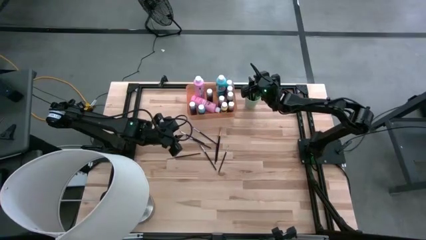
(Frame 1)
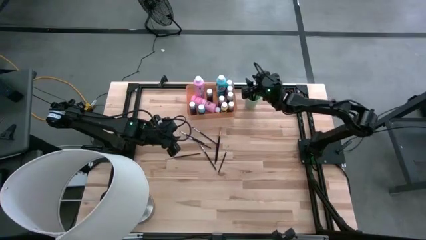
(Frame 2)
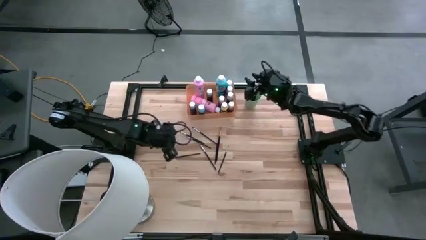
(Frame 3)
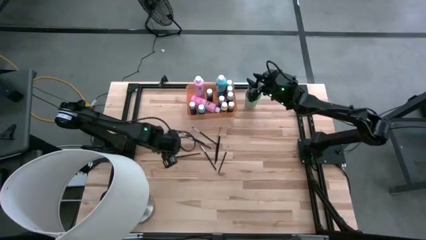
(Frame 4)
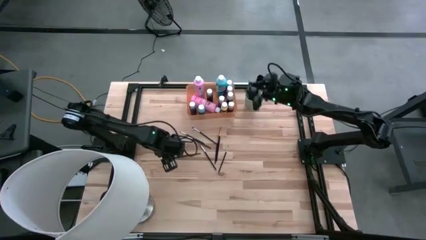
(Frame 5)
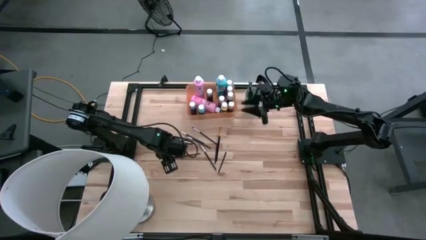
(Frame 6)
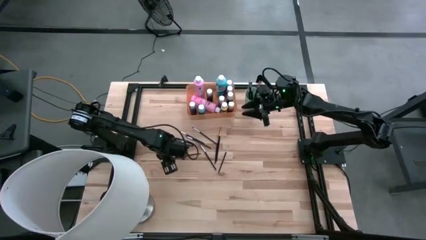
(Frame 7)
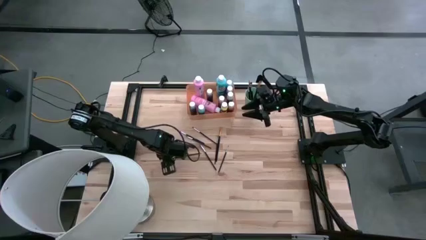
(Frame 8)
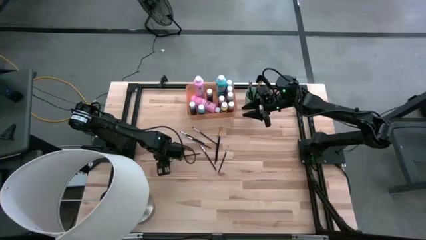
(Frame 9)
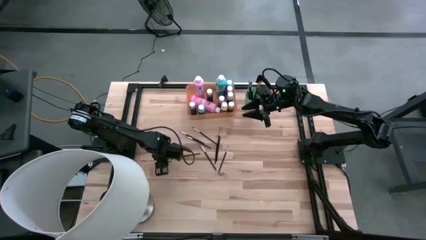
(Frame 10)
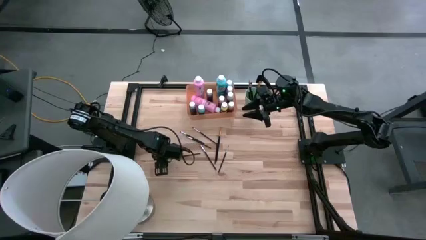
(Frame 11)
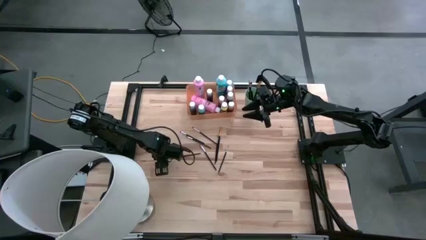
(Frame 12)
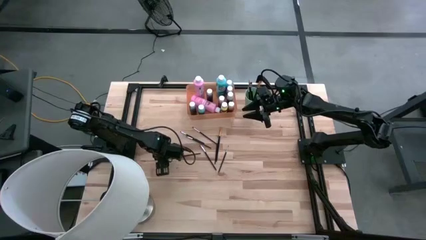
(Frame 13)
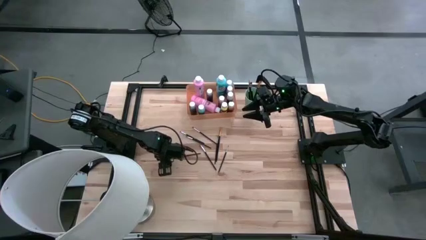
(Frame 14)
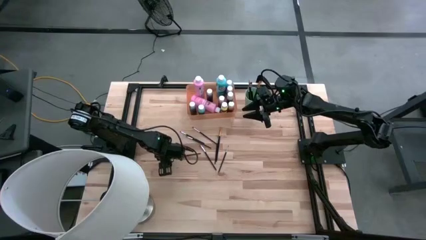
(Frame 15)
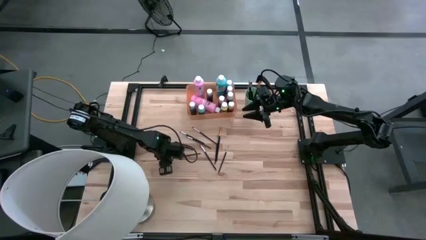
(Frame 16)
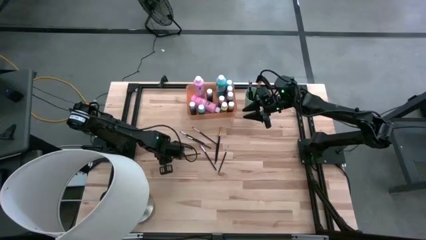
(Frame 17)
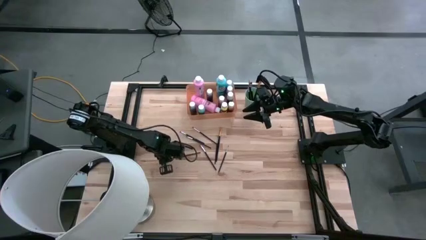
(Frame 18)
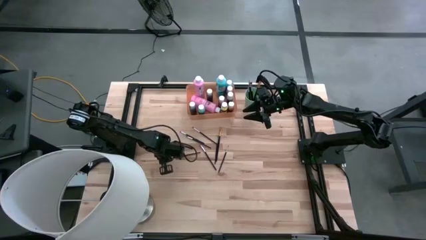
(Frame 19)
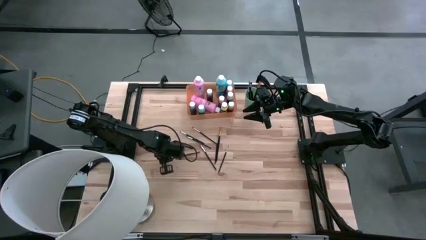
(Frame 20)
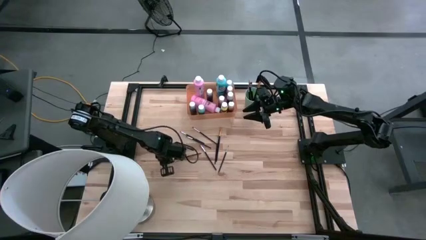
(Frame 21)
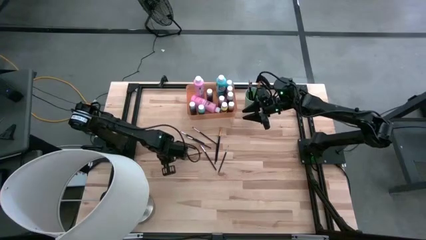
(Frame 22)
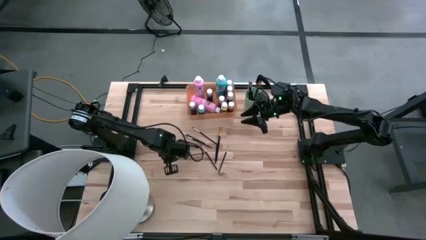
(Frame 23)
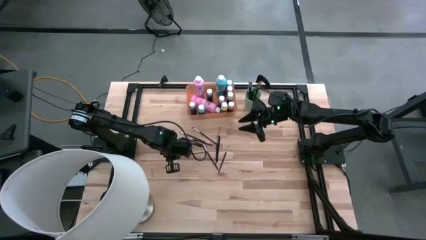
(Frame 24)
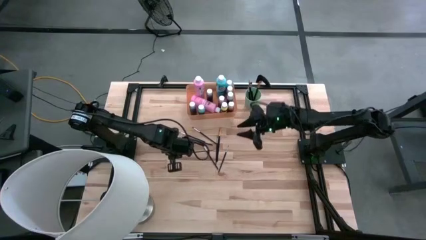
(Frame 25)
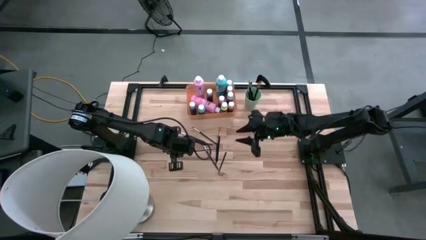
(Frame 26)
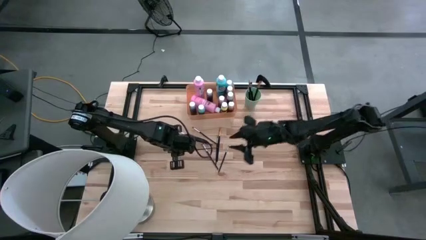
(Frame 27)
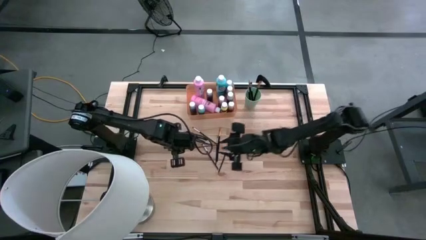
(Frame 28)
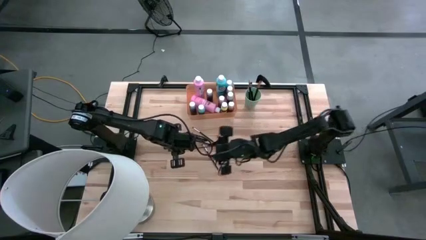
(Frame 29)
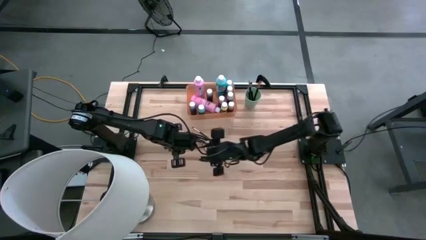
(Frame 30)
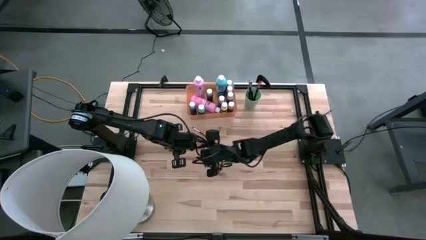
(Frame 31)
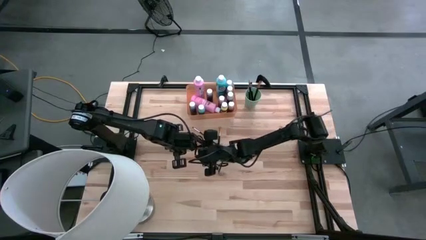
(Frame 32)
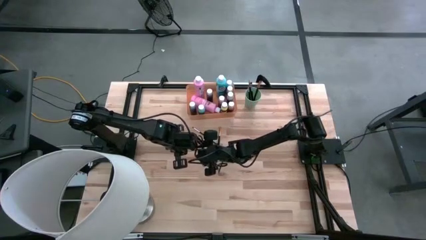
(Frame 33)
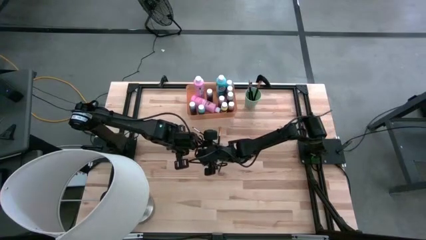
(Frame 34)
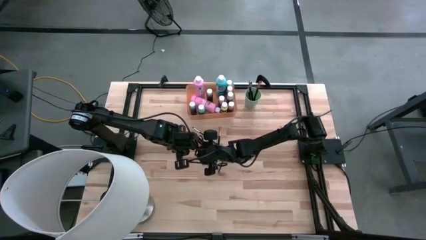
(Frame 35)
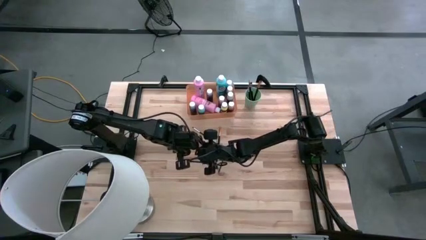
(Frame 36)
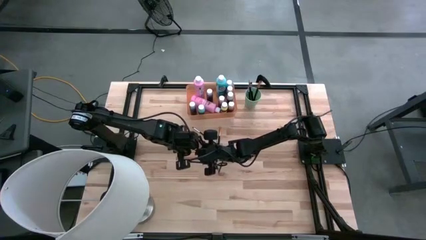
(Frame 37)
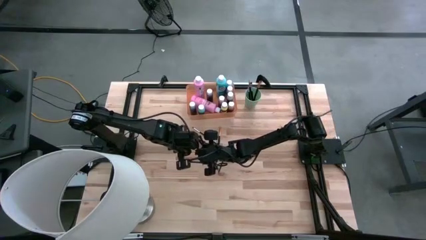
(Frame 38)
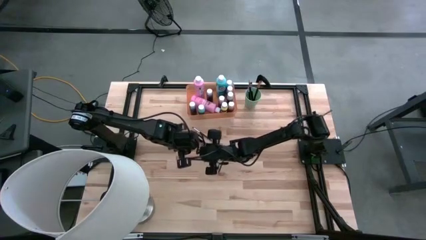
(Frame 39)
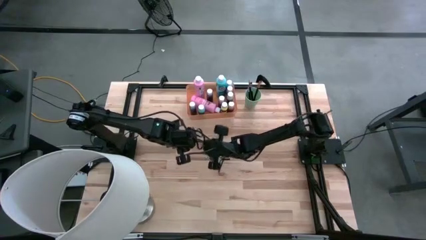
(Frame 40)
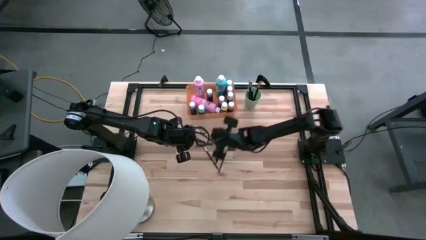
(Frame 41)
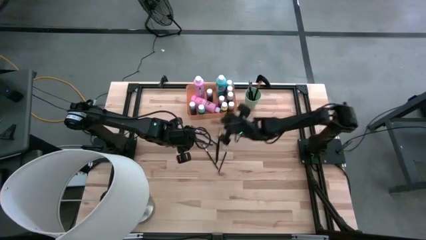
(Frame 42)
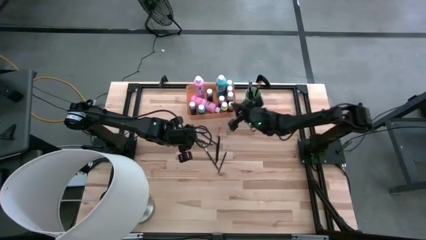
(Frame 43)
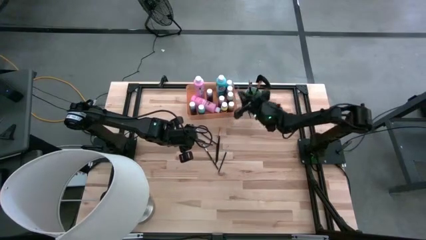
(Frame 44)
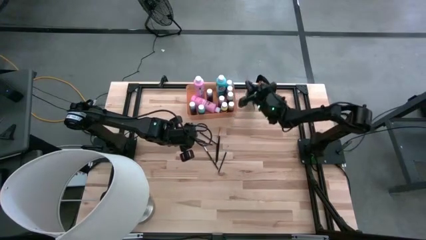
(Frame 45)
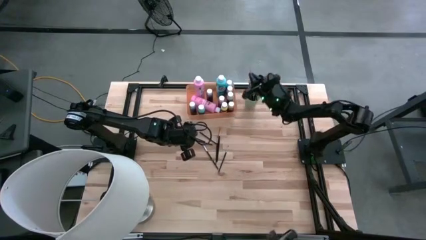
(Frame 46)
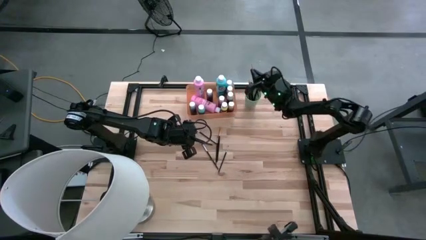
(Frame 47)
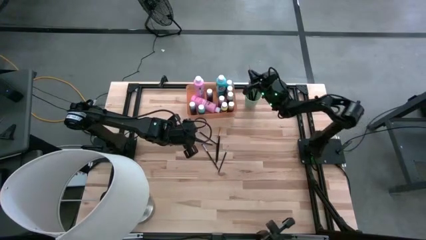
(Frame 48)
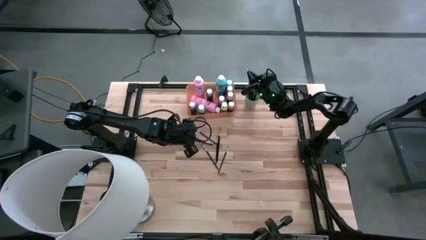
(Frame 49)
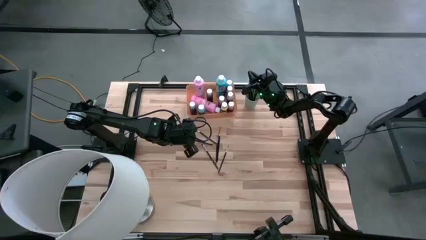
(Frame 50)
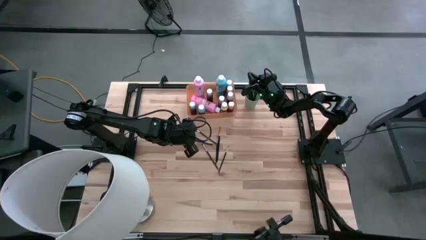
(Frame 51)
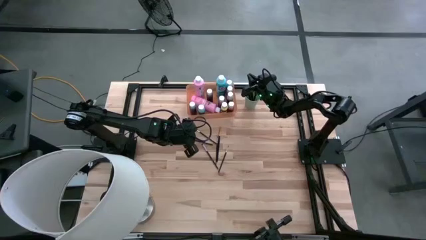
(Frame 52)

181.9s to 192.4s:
Task: Pick & Place Paint Supplies
Put the gold paint brush into the green cup

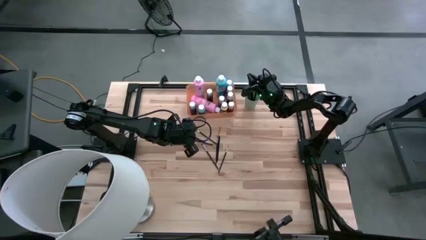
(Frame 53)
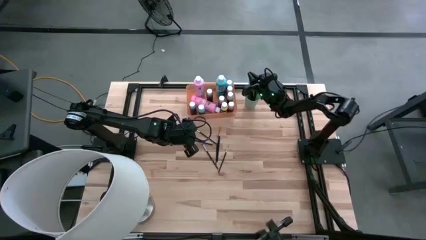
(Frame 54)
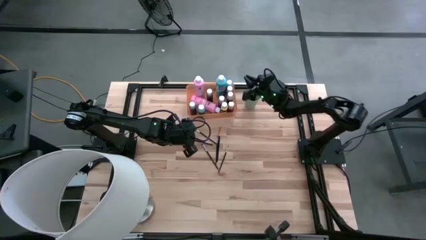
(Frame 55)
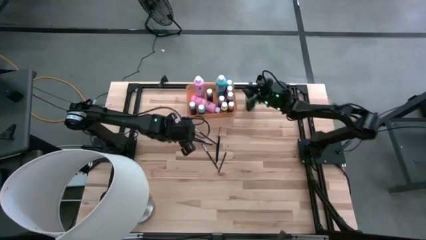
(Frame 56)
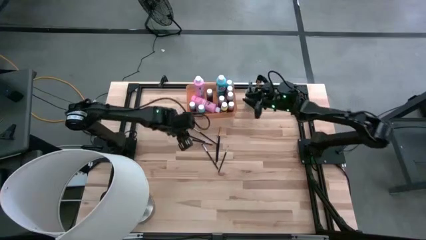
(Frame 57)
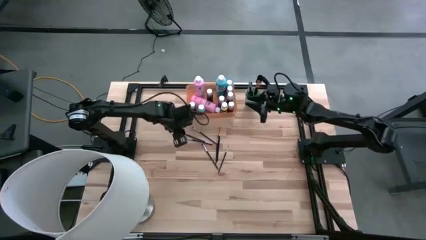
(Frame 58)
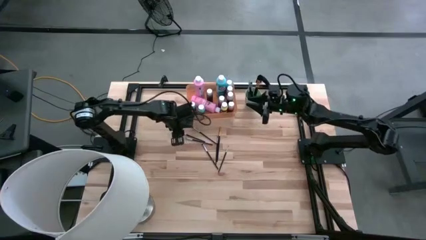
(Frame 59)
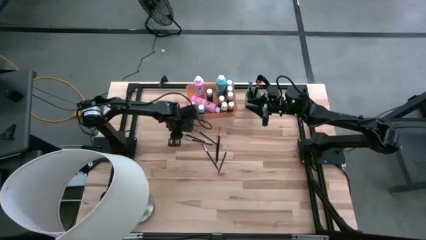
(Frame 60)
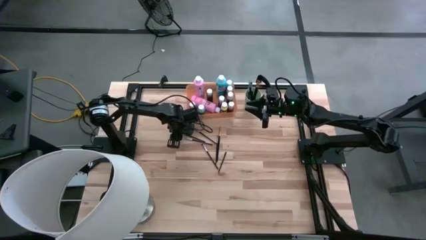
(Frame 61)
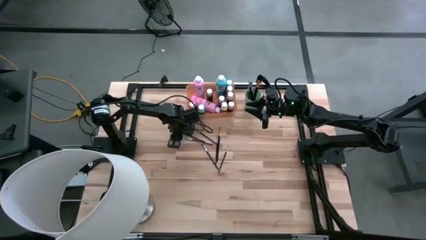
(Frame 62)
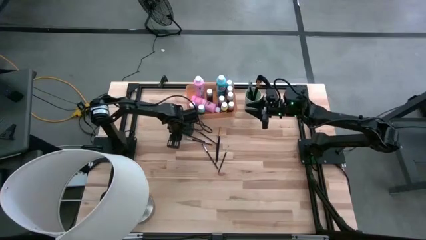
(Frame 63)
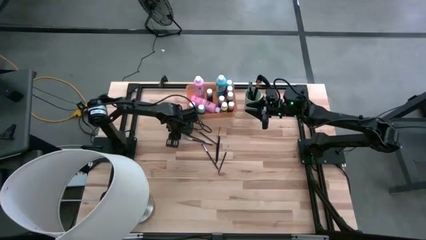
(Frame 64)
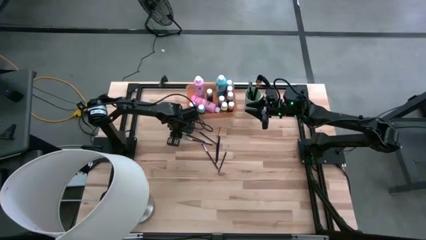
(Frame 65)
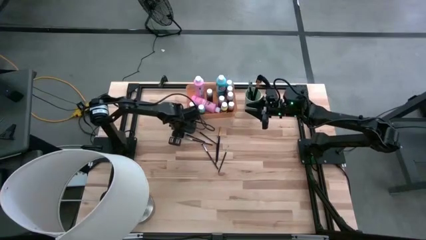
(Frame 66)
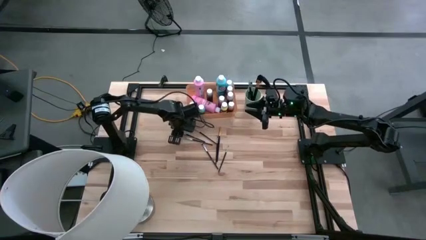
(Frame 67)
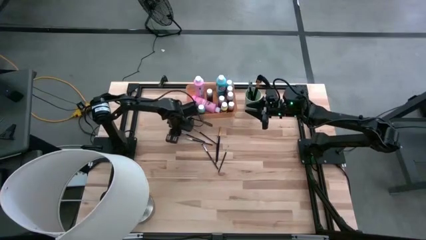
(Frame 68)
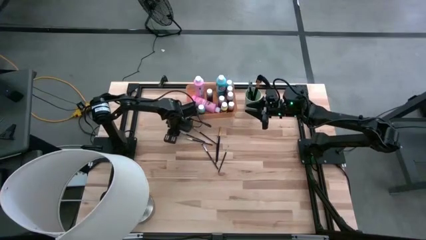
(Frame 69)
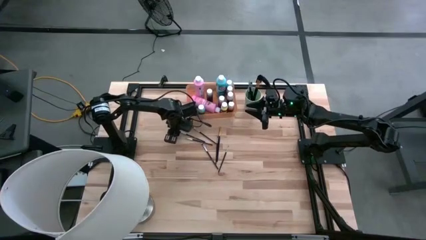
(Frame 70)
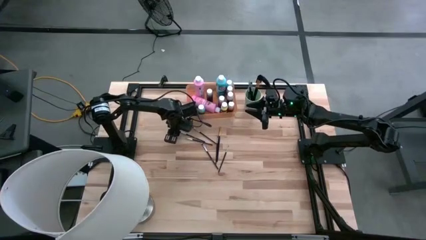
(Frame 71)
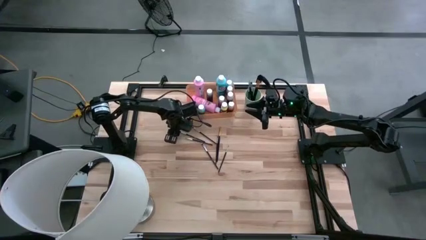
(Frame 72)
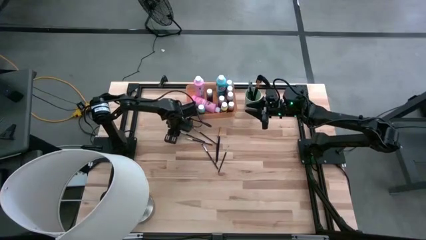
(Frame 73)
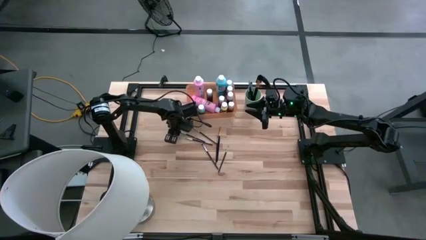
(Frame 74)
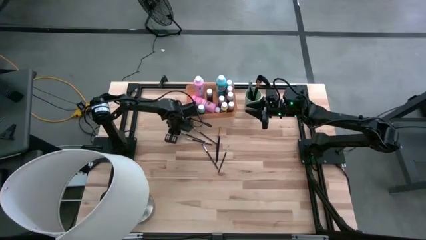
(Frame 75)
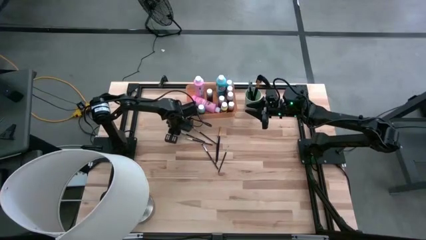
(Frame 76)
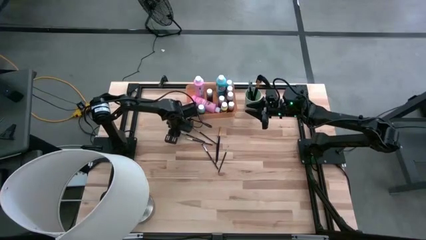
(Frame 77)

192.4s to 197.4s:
Put the silver paint brush into the green cup
